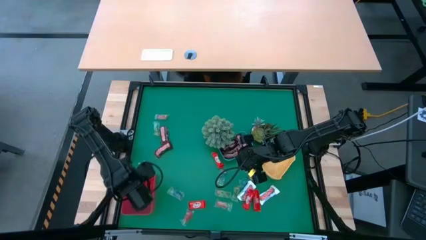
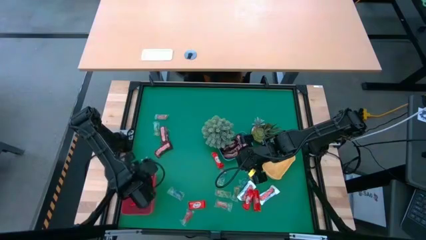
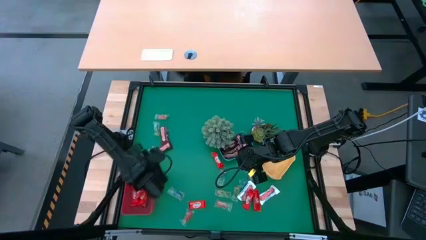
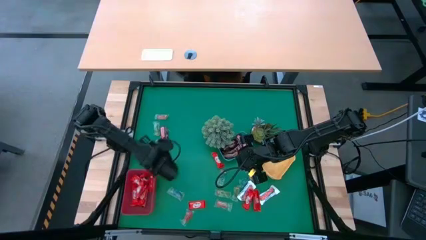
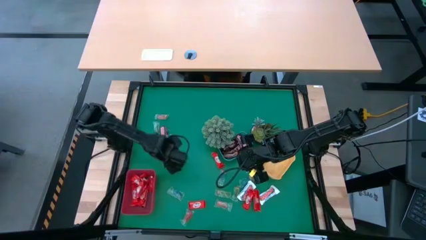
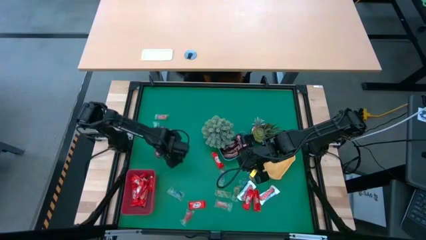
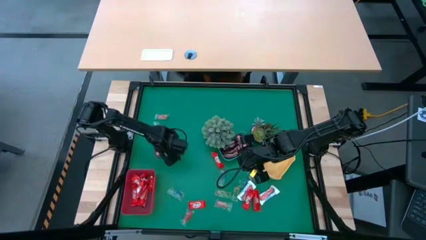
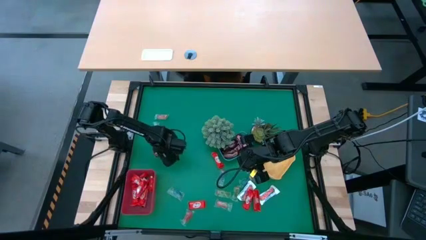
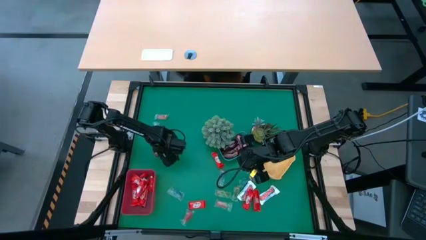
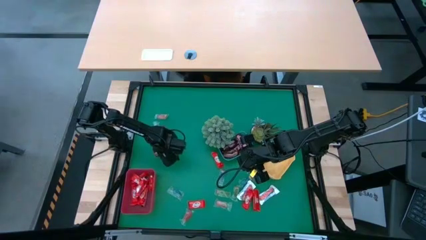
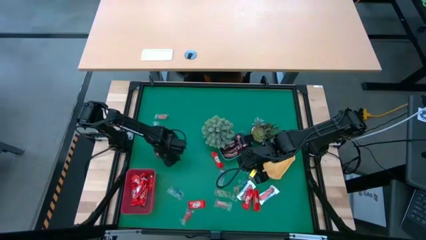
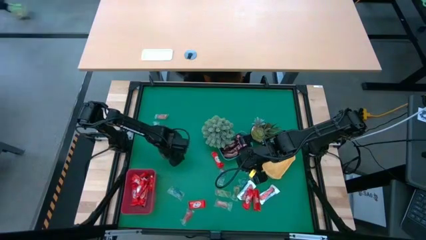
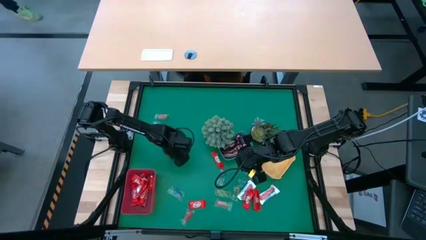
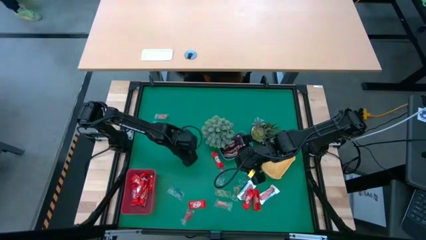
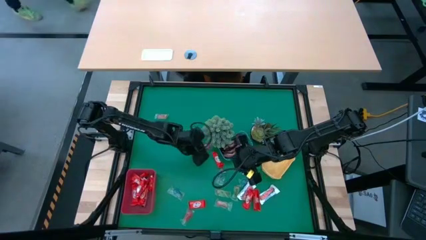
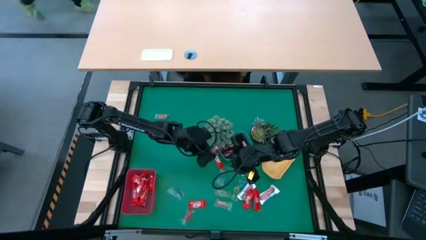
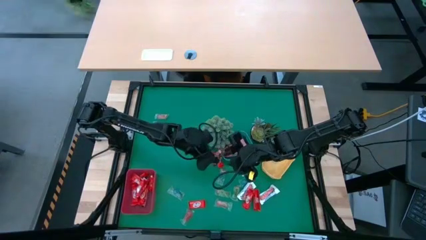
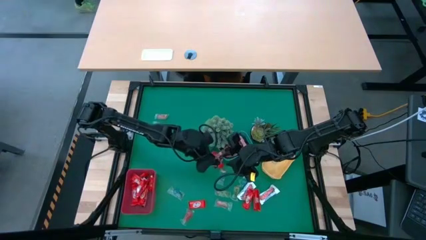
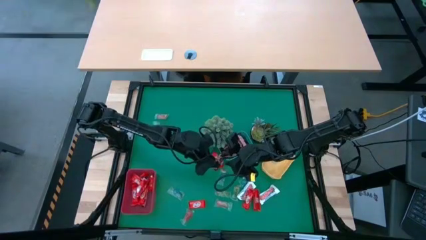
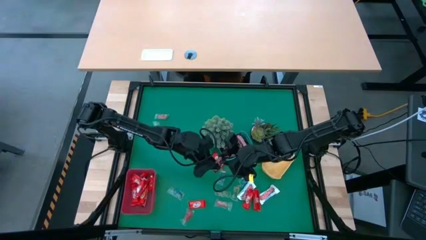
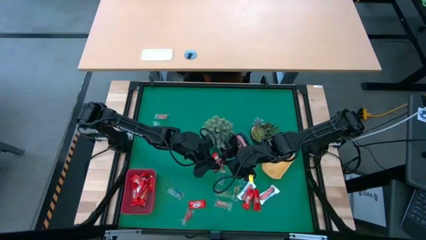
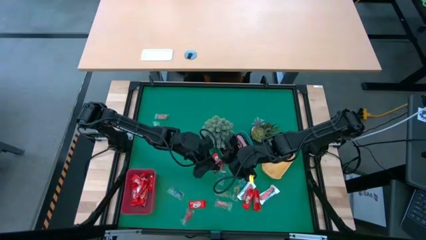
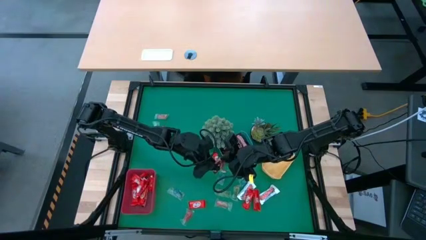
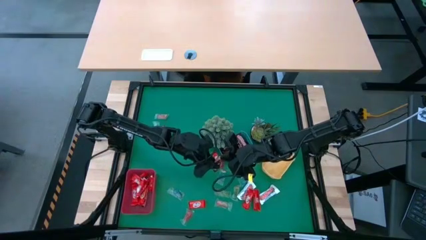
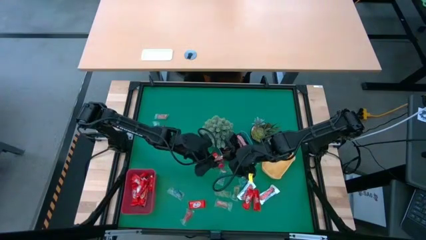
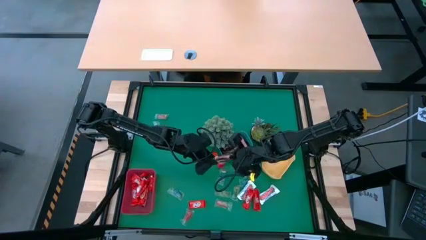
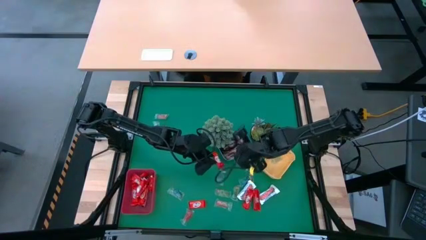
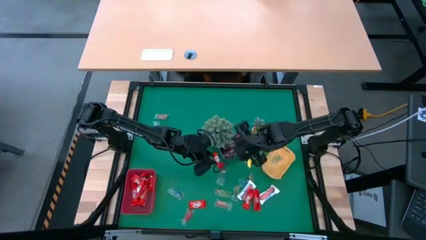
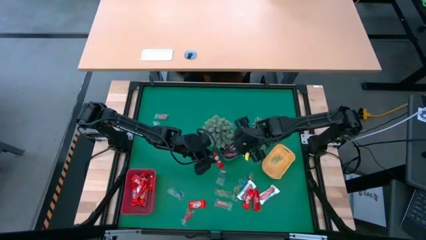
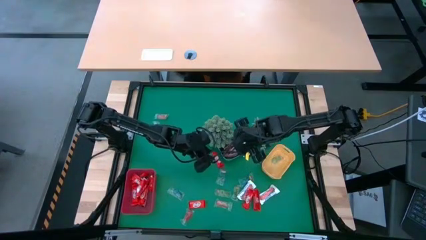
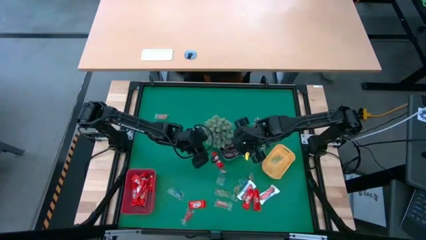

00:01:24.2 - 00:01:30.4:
Task: Organize candy in baskets
Put the brown chocolate into the blue bin

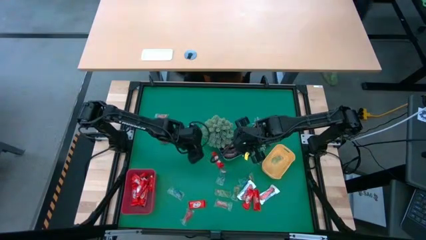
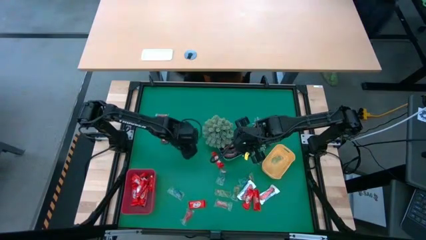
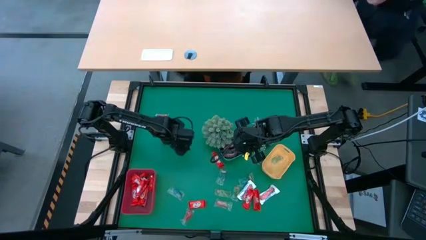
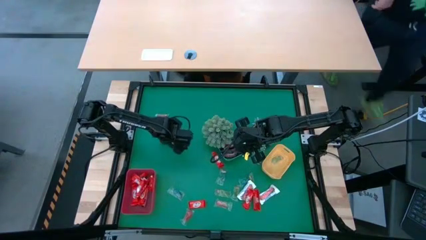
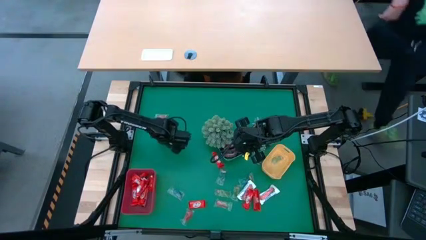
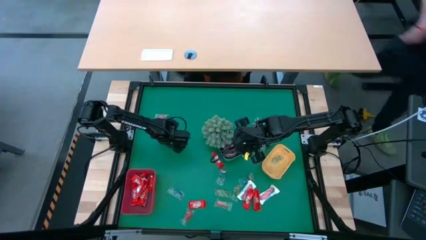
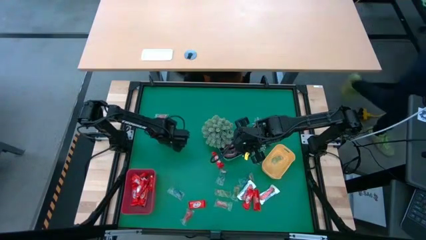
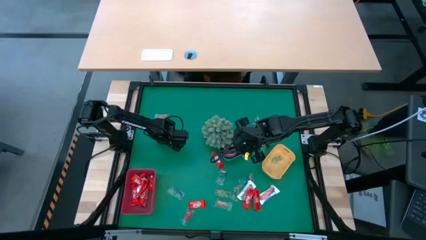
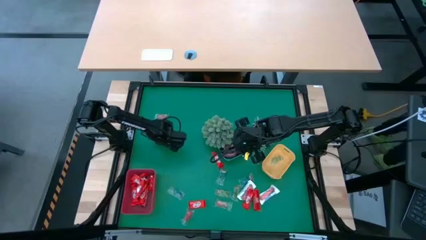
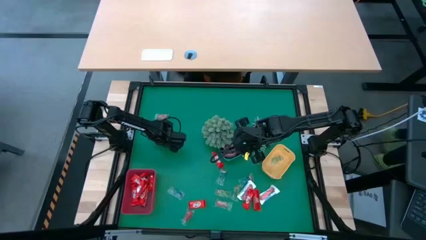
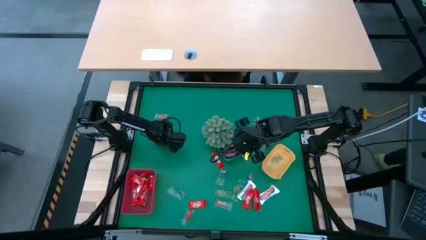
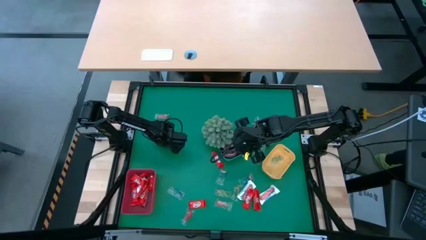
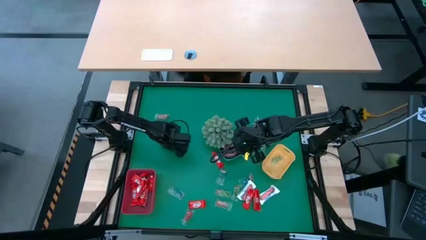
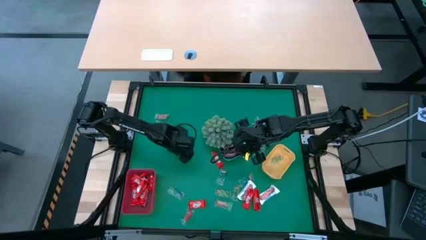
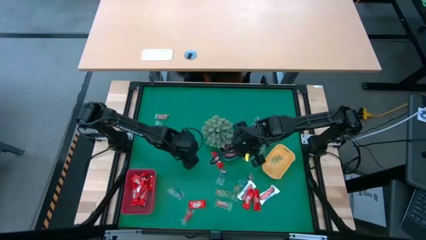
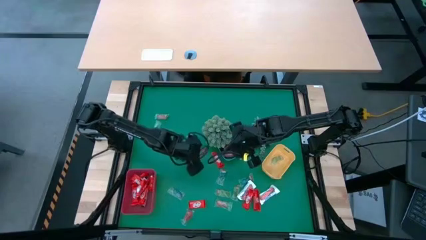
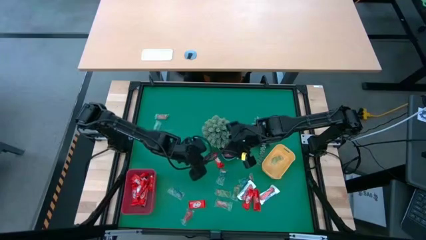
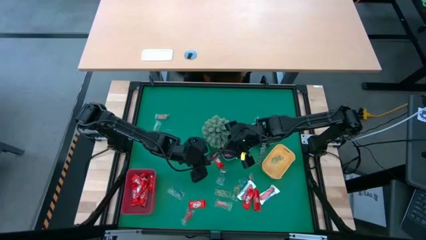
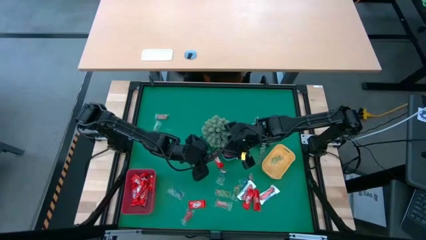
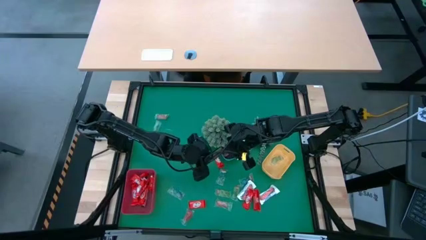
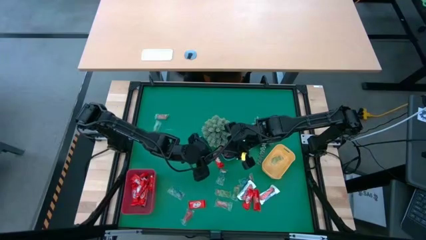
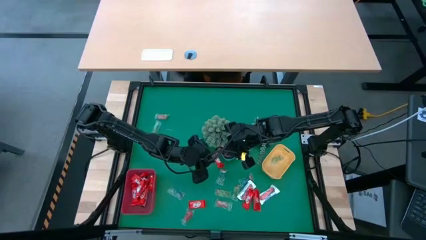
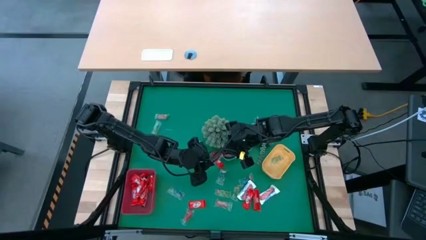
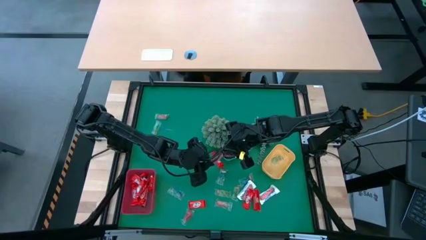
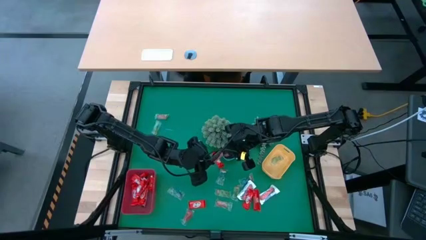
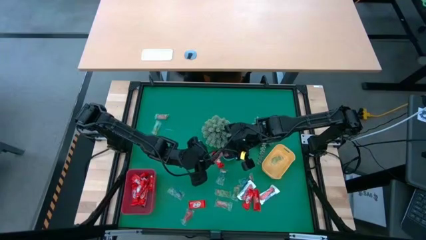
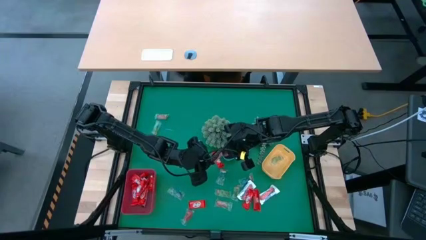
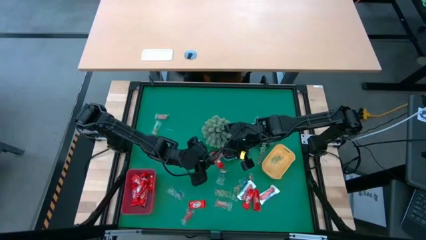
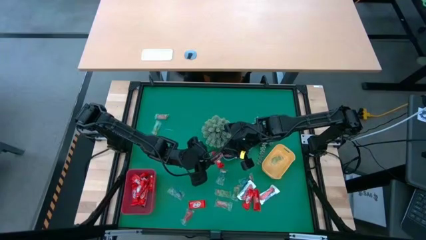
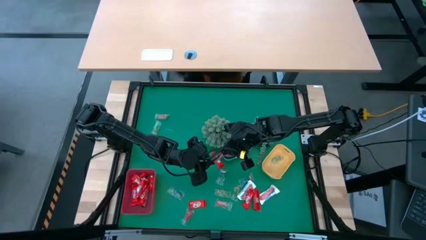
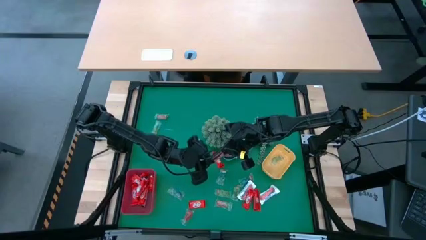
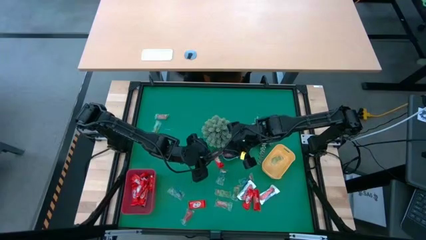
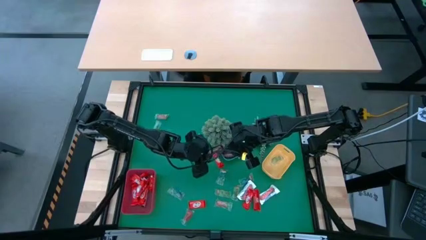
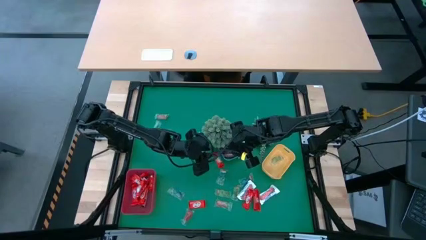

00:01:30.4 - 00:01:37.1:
Put the brown chocolate into the blue bin

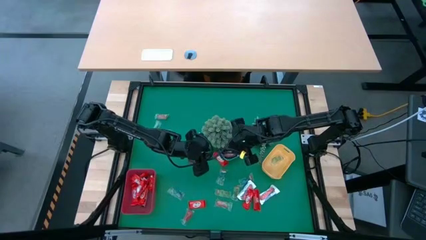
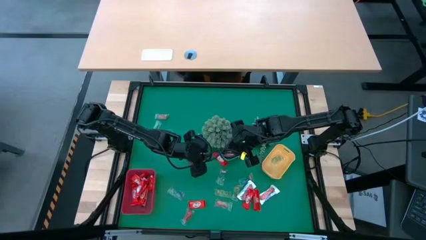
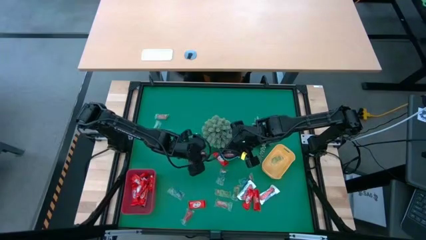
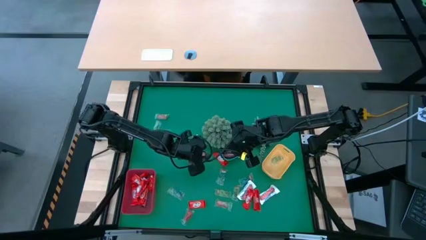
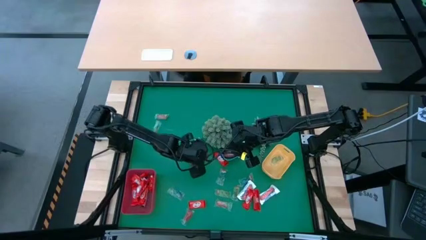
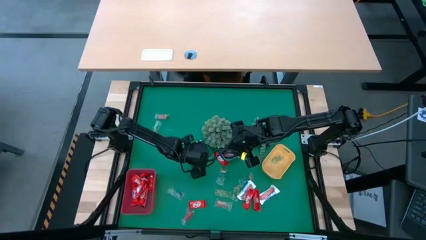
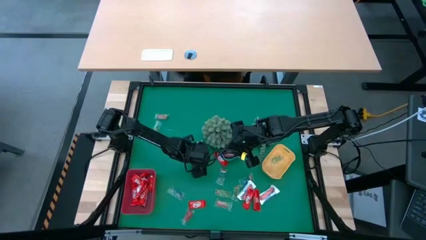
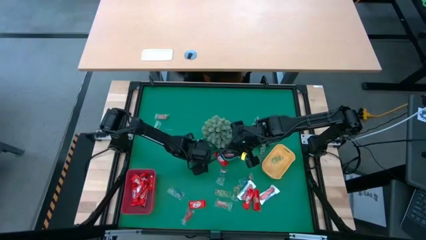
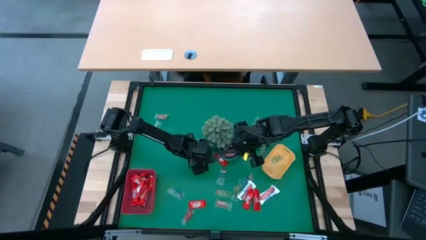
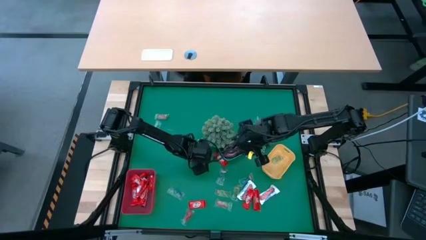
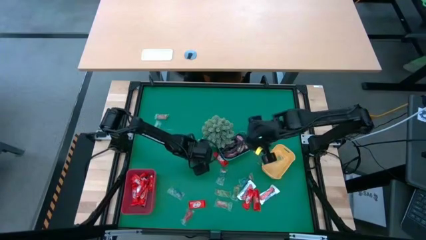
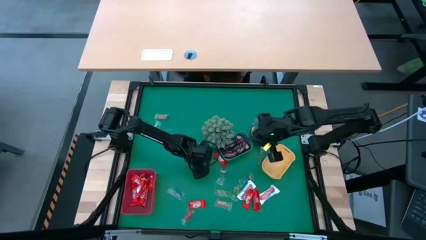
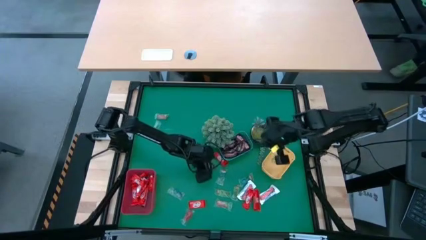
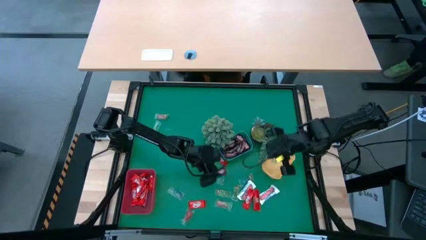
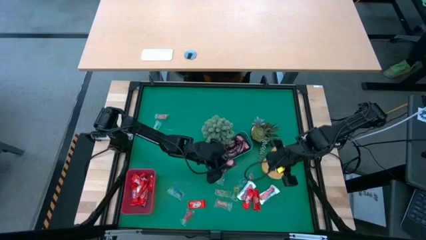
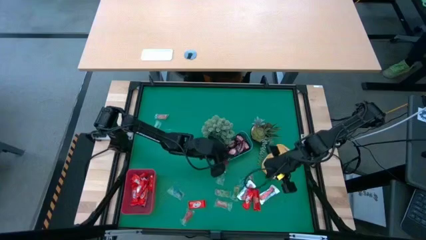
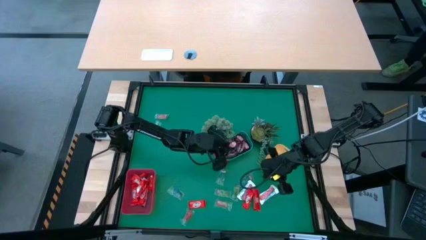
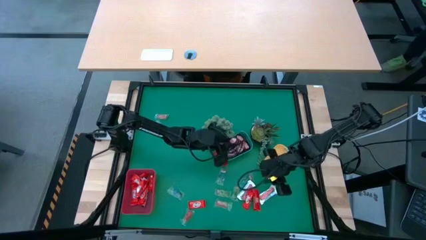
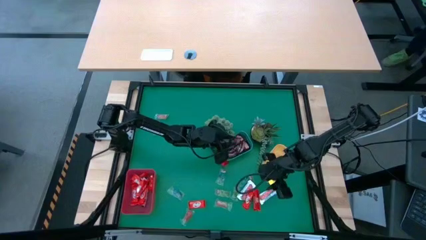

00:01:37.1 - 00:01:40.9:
Put the brown chocolate into the blue bin
